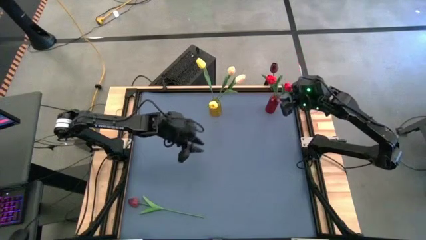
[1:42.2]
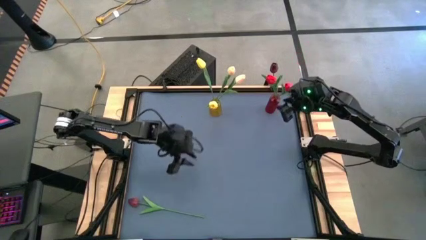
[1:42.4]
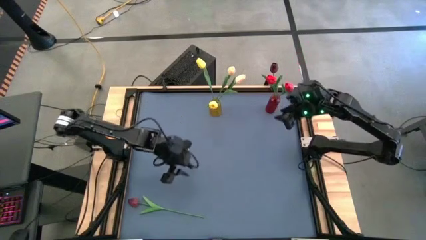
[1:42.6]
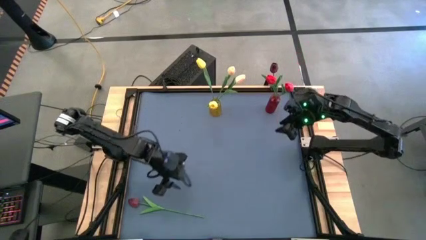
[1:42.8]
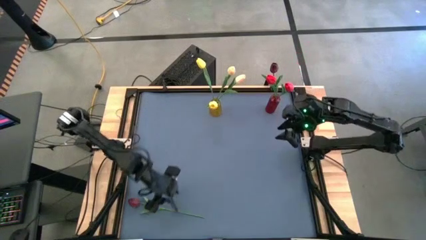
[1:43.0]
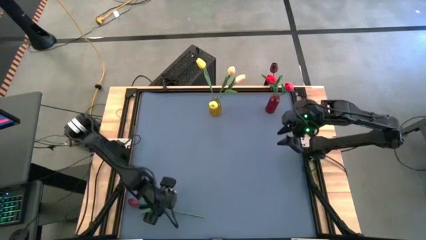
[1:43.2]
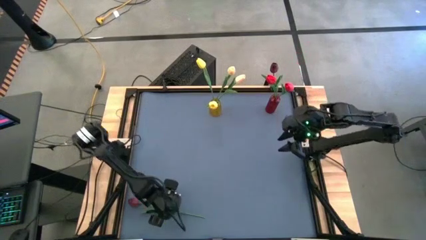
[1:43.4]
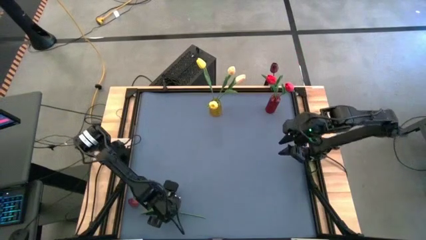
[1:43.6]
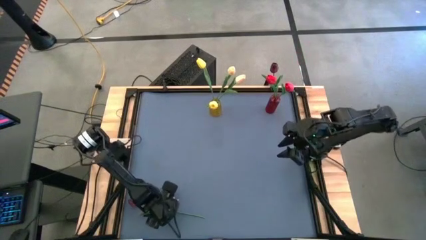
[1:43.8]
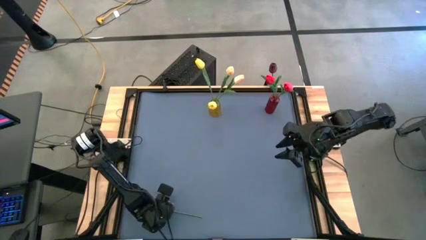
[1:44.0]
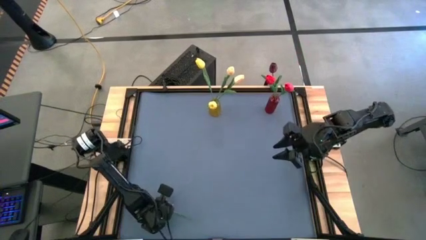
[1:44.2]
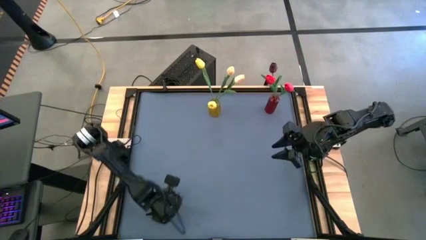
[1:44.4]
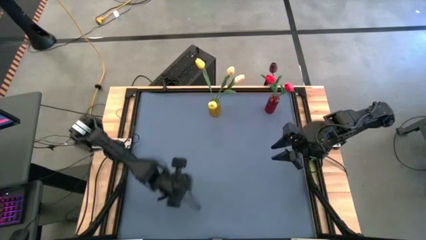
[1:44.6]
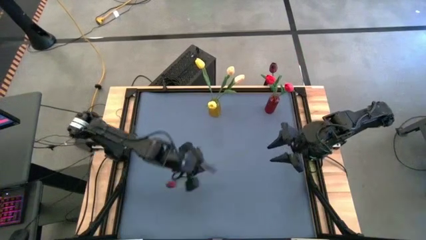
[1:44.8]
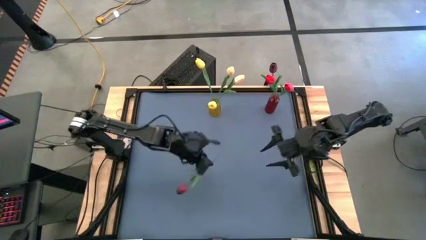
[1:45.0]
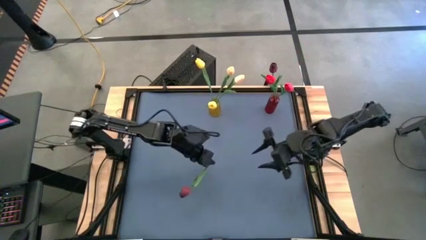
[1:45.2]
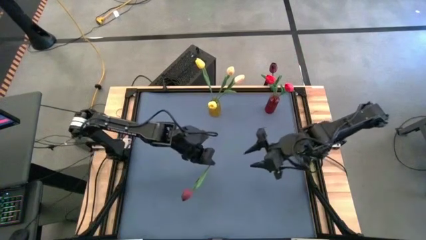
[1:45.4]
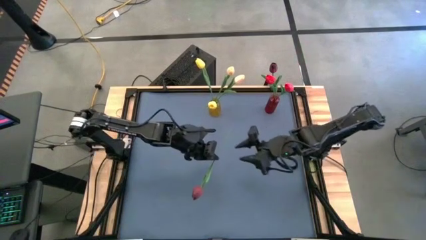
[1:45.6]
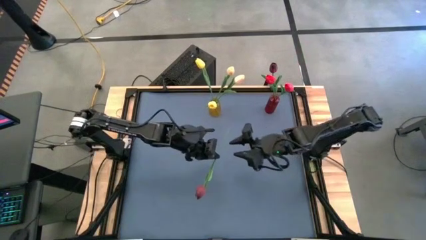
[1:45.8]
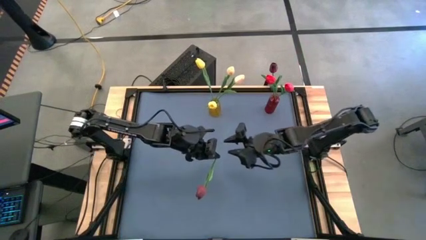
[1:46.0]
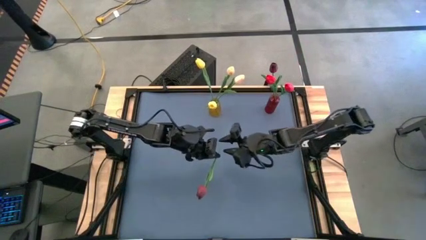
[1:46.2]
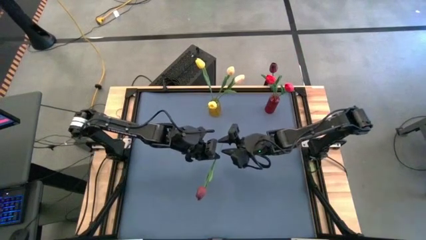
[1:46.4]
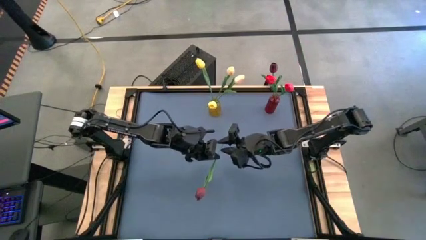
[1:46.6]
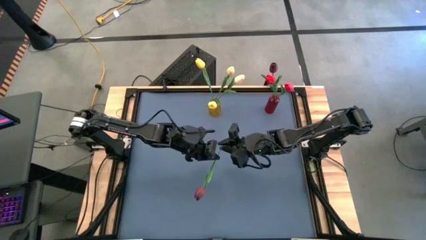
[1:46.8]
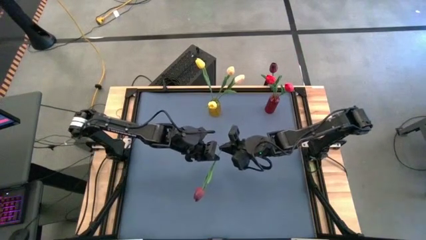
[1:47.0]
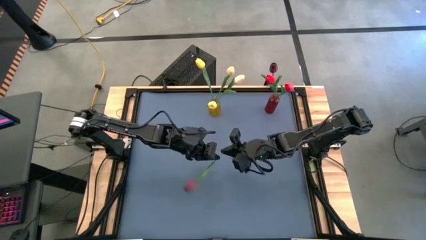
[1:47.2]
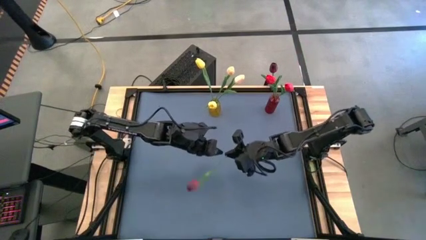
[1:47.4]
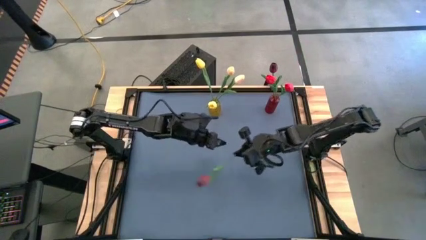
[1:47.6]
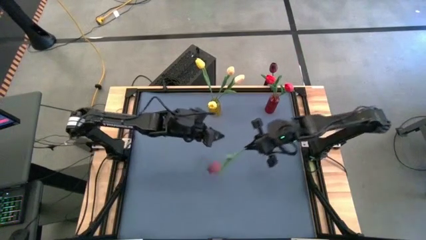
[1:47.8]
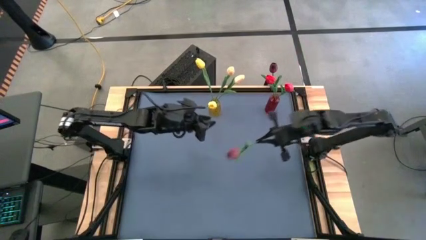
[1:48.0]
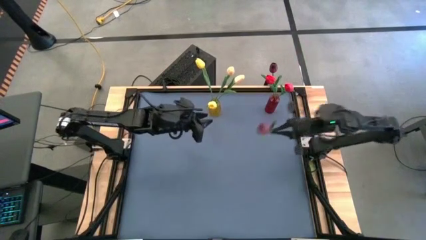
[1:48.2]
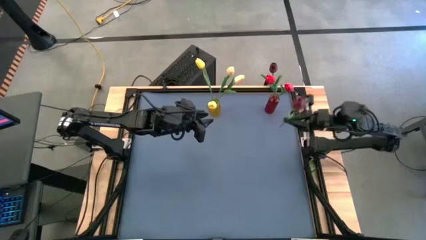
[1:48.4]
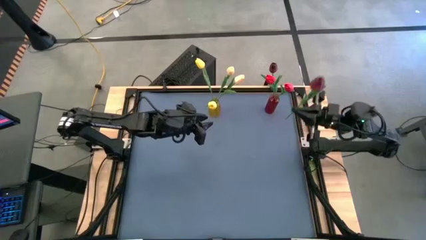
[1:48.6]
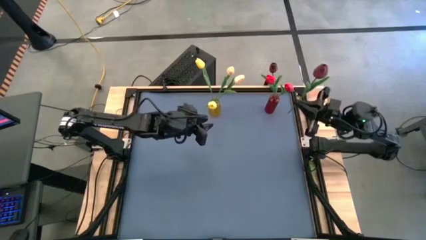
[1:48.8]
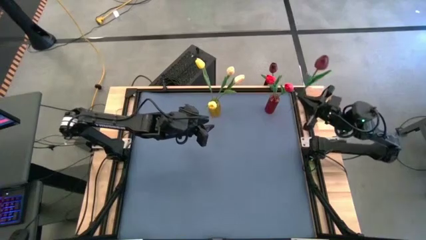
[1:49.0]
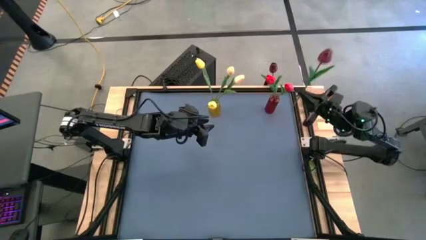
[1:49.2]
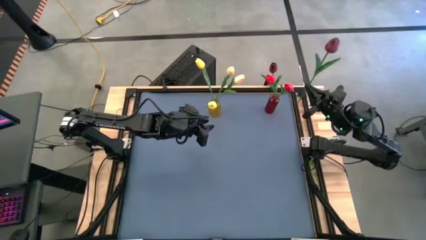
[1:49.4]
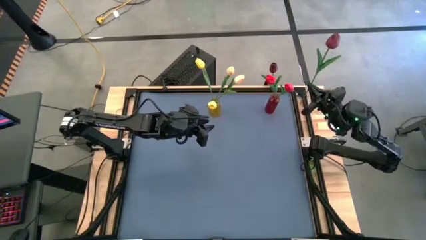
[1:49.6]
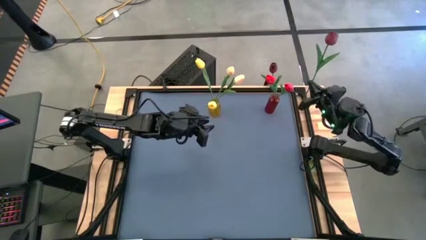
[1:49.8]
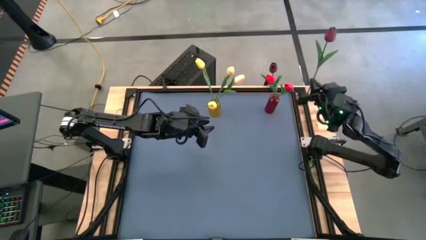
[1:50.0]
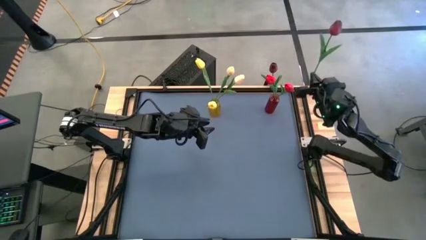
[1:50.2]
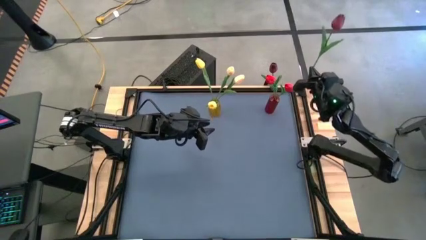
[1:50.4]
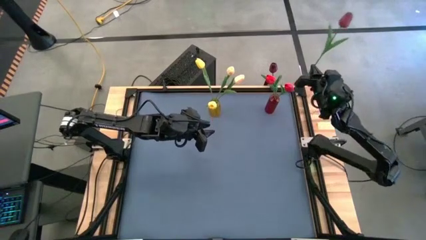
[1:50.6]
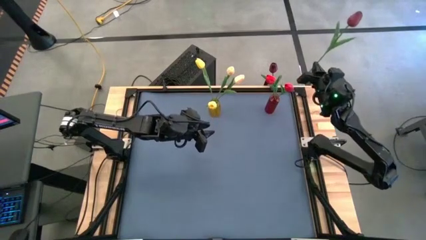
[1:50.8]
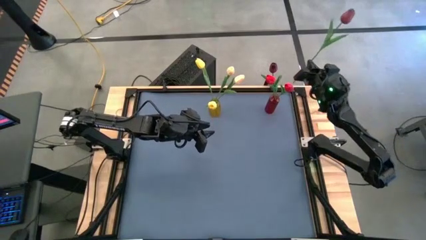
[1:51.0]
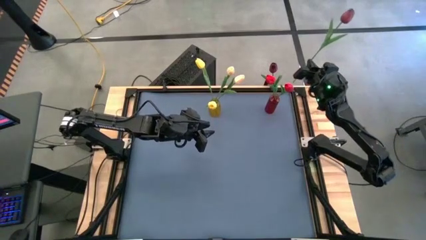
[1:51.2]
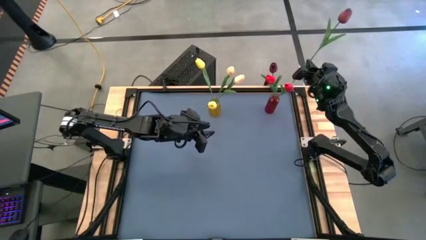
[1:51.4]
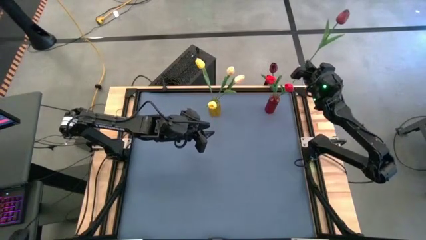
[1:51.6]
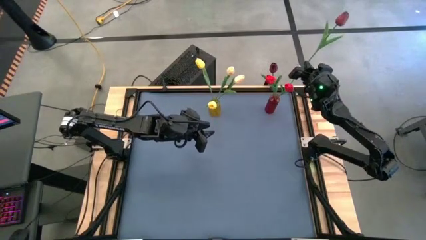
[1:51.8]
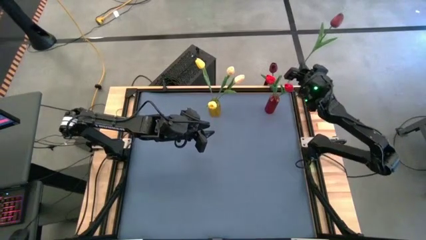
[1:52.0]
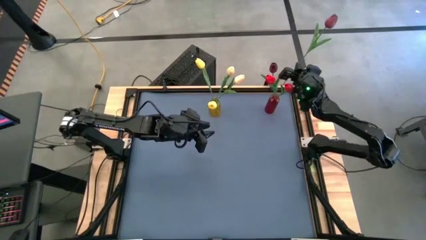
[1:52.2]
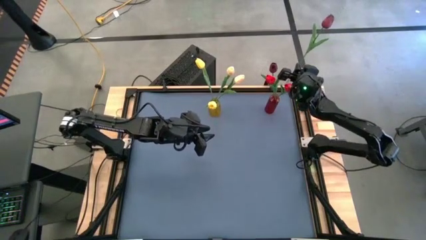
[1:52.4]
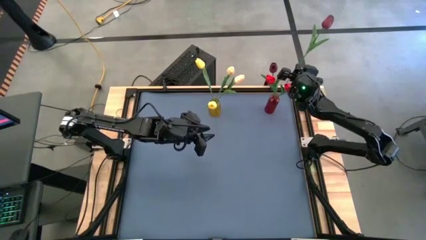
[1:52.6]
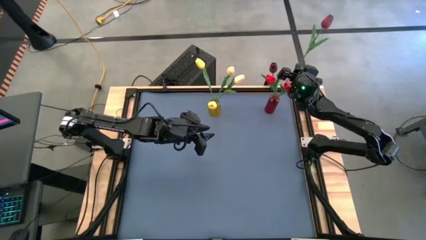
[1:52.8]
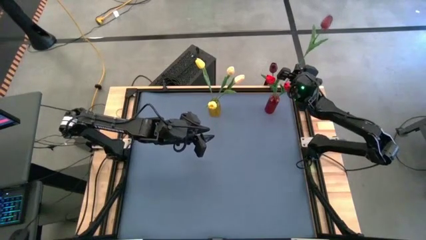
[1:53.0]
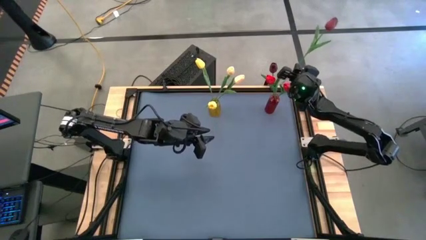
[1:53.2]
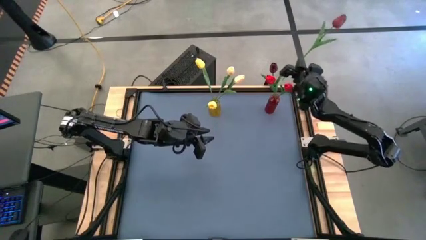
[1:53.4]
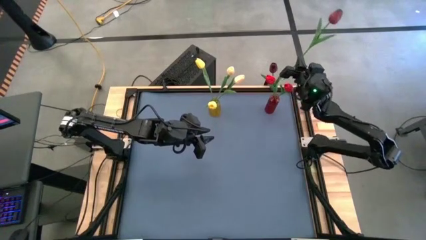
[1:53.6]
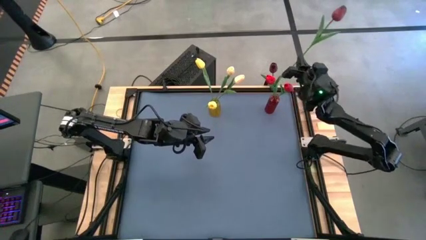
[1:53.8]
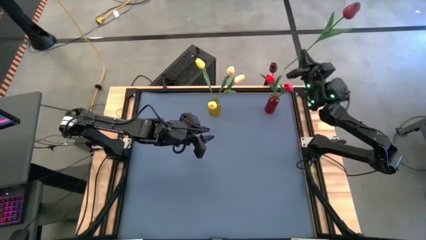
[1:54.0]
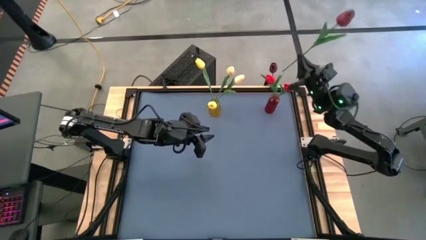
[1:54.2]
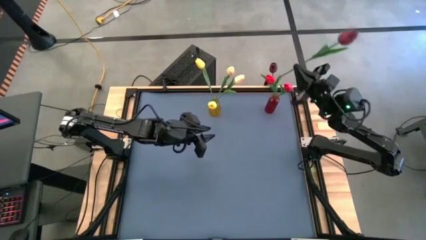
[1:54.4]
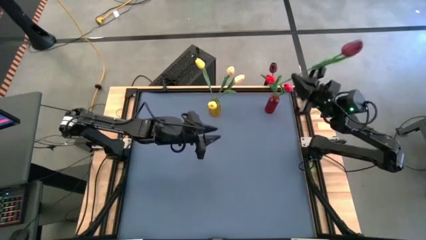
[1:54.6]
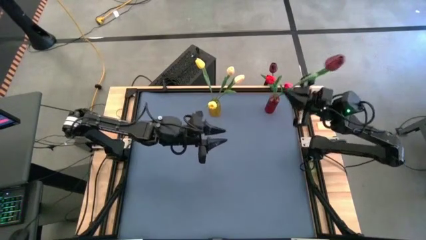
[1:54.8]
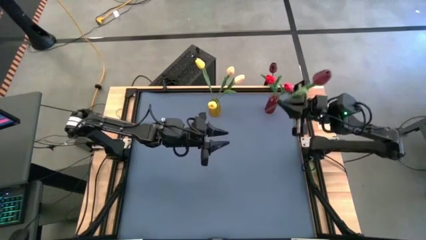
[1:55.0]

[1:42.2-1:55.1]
Task: Sort flowers into vase by color
Put the dark red flower into the red vase

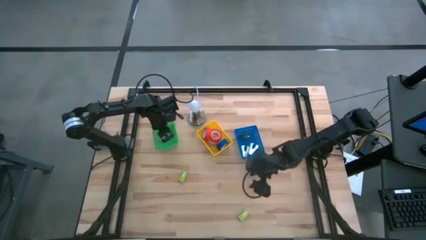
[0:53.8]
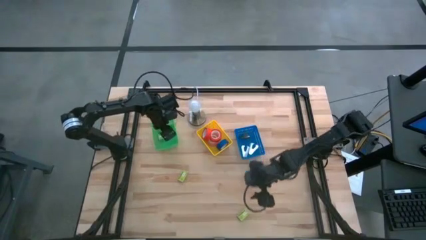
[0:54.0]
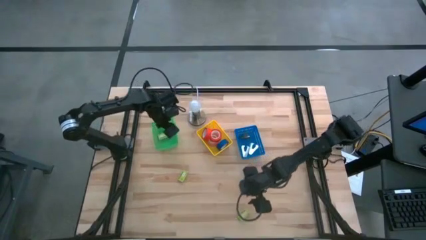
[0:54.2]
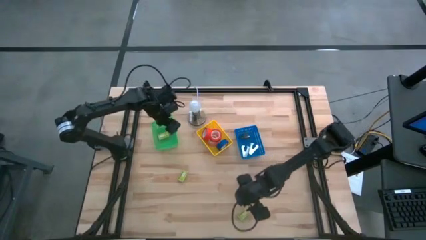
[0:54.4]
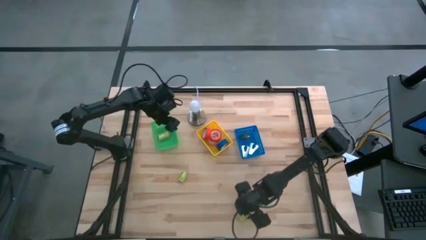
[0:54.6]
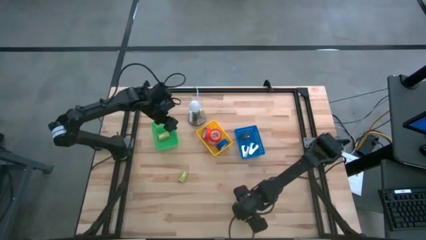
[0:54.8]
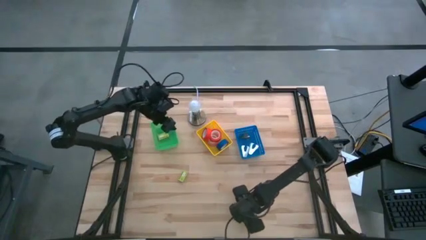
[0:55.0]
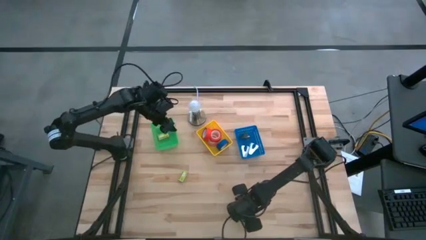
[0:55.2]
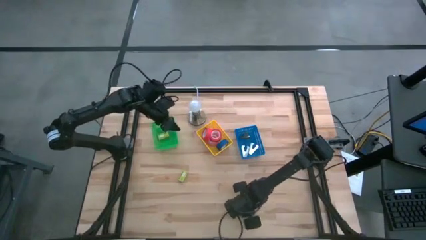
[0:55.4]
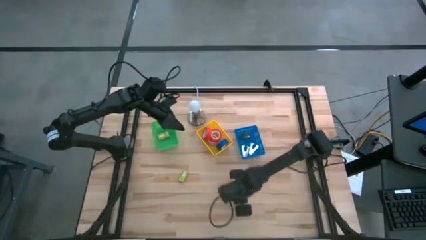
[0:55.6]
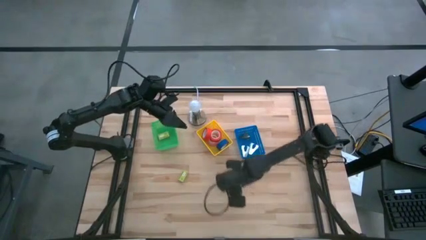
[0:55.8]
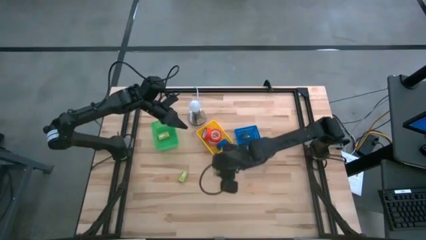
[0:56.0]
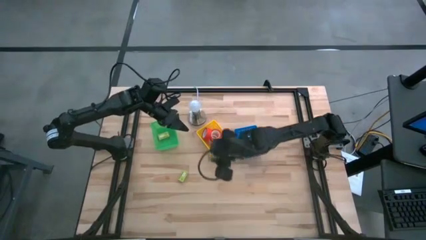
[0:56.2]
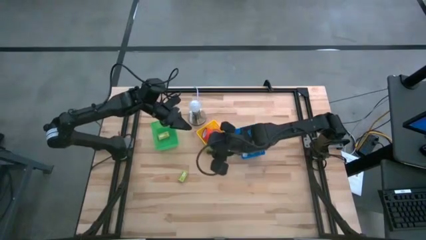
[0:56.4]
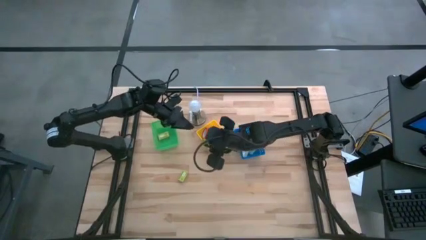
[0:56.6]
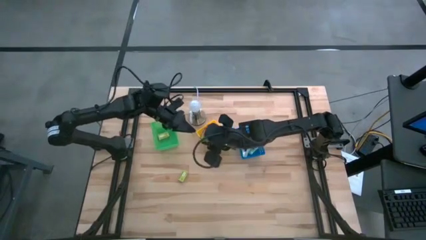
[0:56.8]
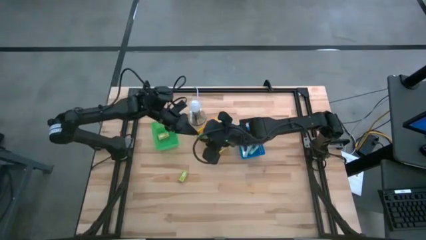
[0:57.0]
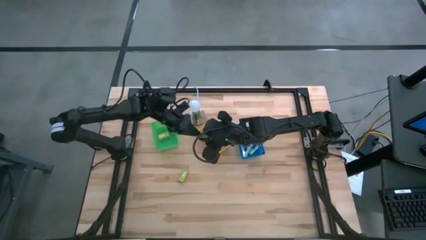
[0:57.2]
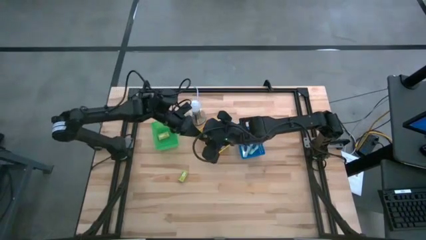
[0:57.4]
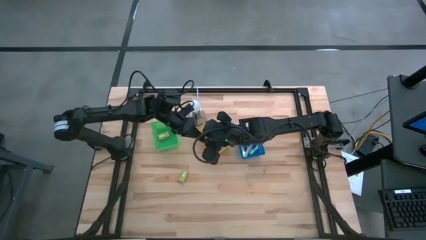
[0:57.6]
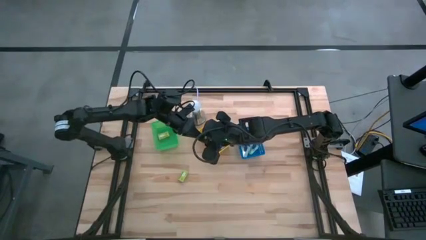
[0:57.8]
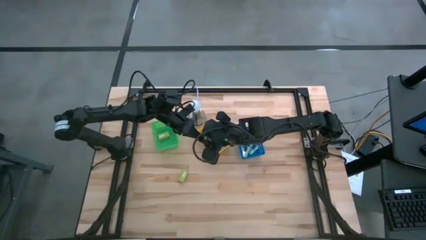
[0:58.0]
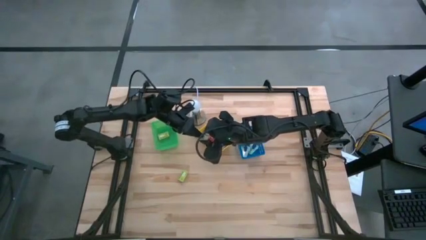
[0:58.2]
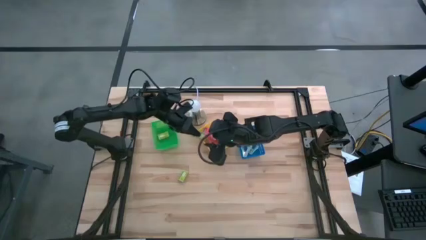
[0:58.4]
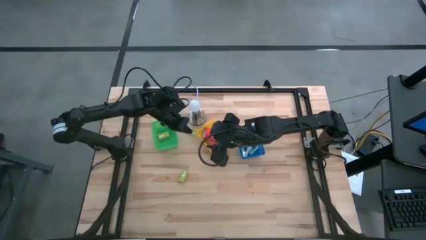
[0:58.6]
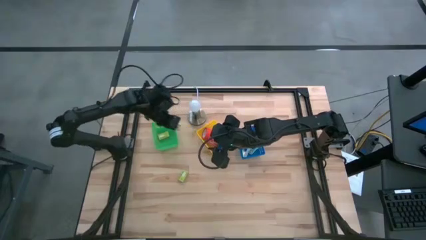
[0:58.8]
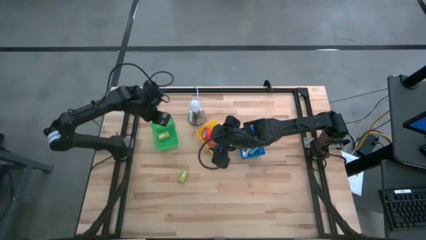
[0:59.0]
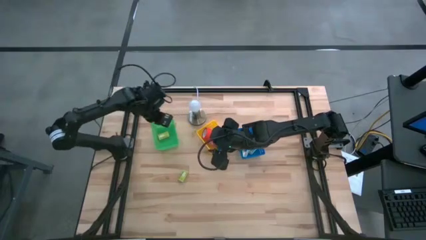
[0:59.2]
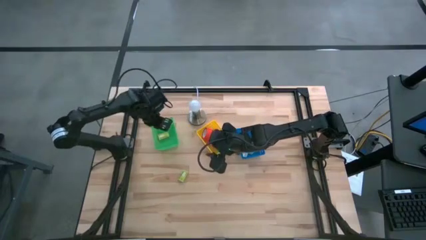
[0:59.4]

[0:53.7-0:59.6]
Task: Pick and place Stapler, Stapler remover, tape
Put the bottom staple box into the green basket
